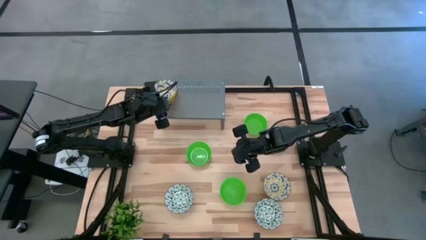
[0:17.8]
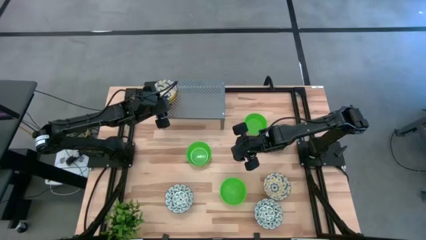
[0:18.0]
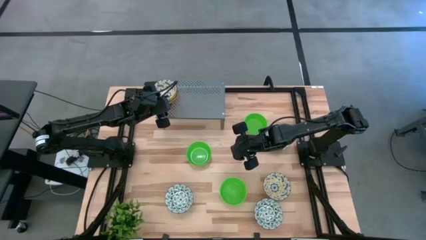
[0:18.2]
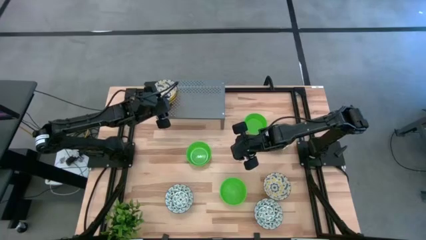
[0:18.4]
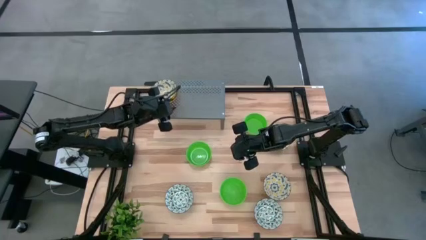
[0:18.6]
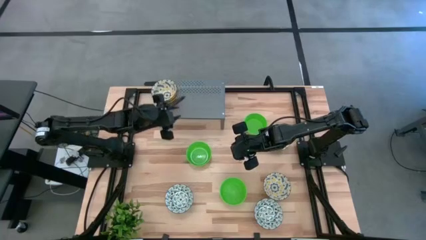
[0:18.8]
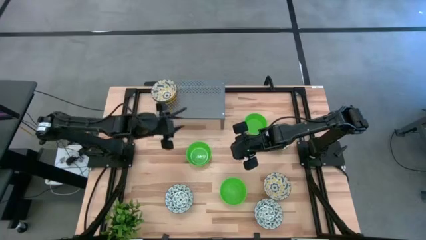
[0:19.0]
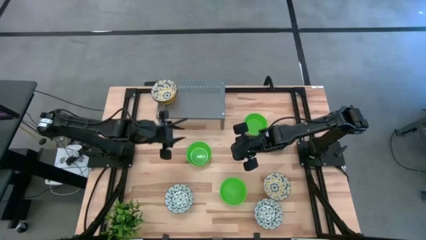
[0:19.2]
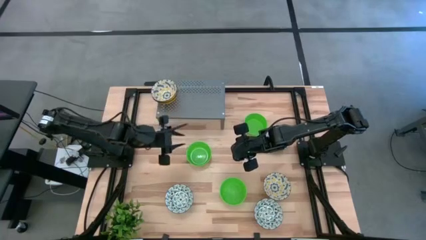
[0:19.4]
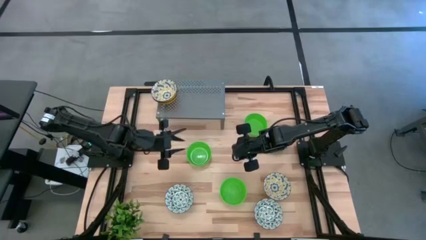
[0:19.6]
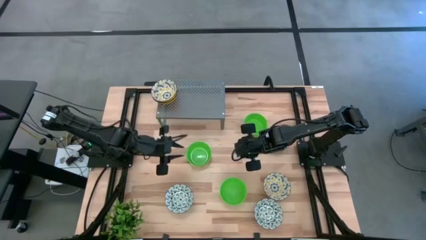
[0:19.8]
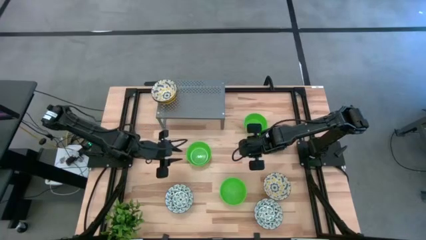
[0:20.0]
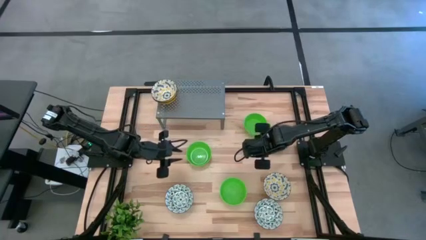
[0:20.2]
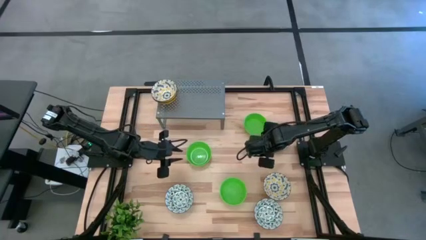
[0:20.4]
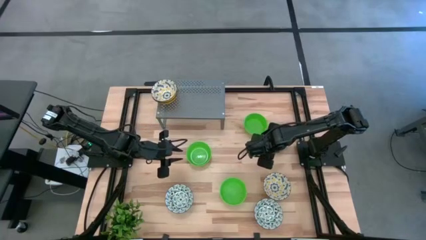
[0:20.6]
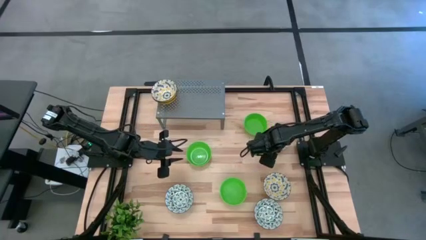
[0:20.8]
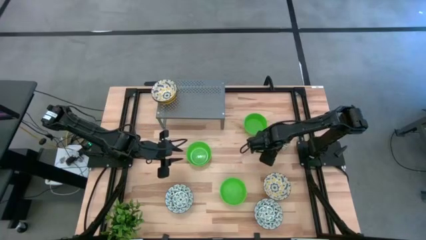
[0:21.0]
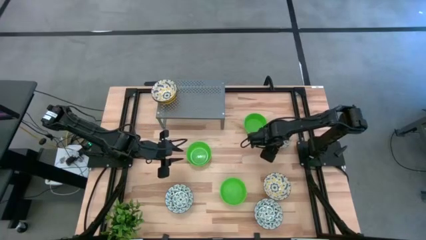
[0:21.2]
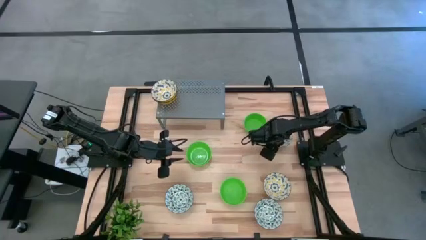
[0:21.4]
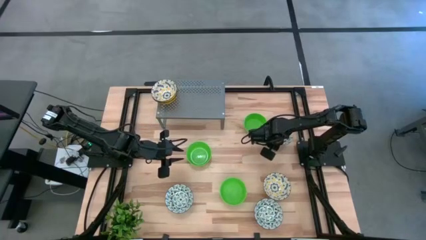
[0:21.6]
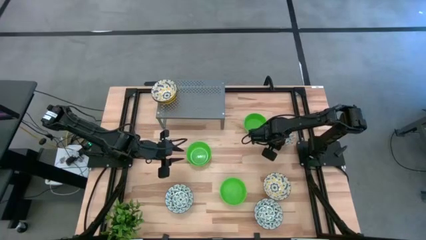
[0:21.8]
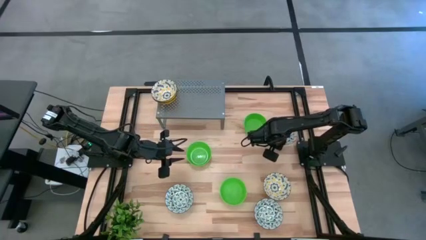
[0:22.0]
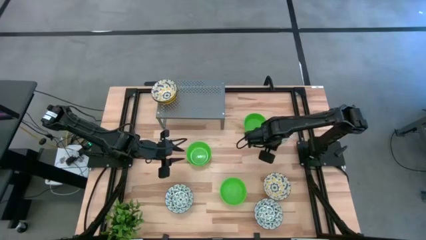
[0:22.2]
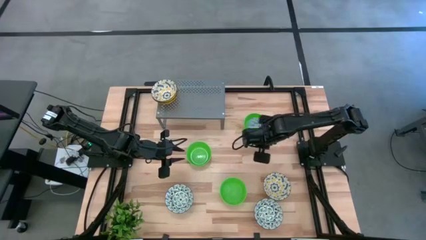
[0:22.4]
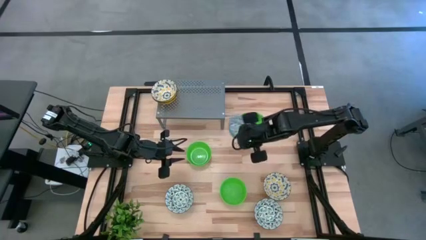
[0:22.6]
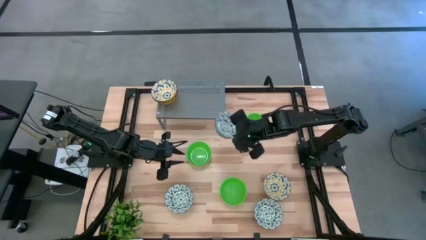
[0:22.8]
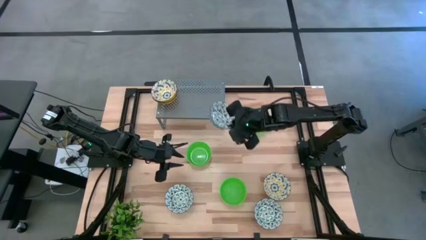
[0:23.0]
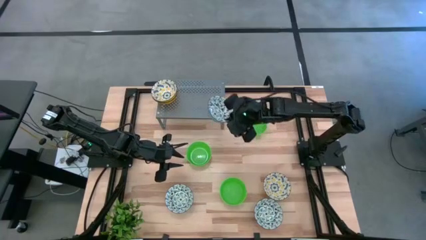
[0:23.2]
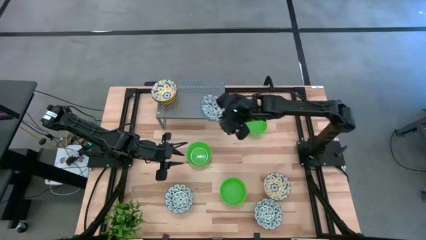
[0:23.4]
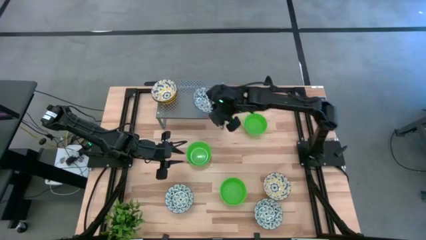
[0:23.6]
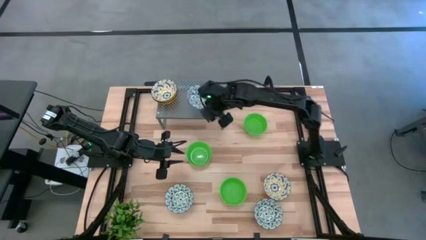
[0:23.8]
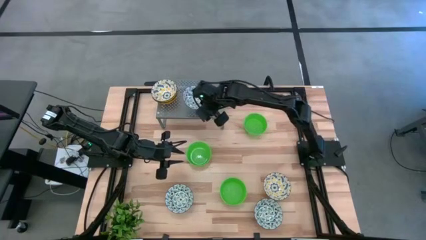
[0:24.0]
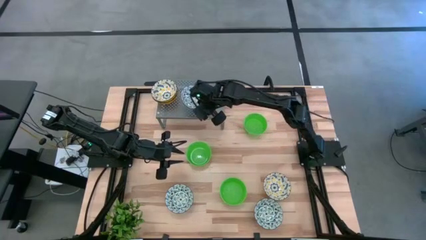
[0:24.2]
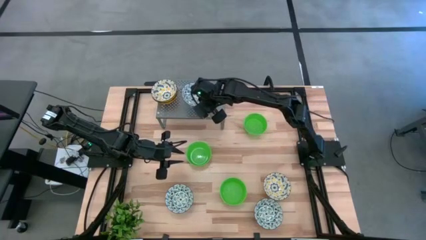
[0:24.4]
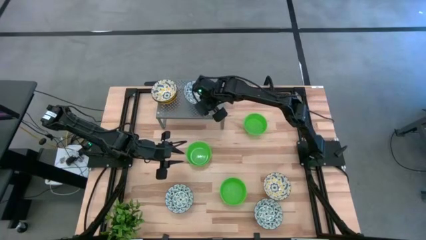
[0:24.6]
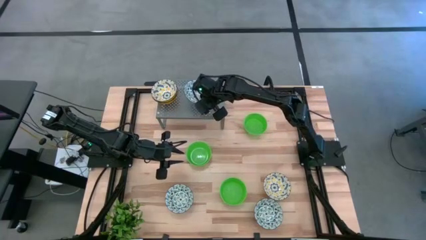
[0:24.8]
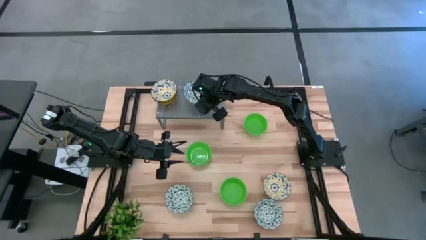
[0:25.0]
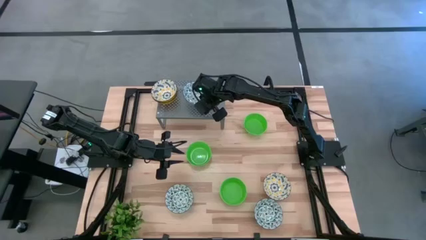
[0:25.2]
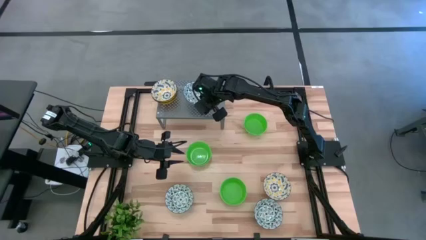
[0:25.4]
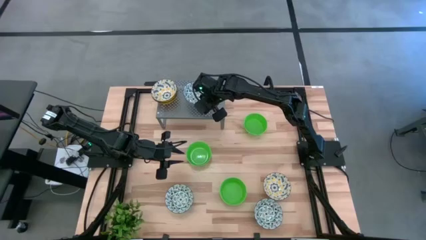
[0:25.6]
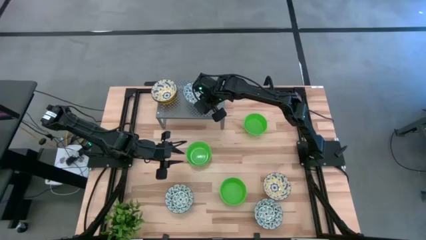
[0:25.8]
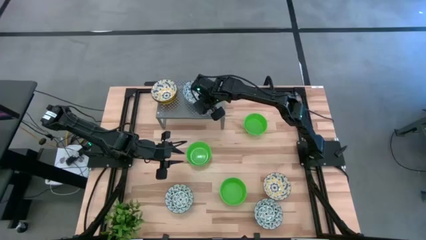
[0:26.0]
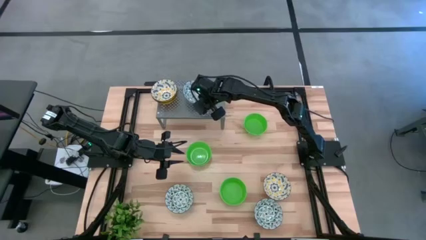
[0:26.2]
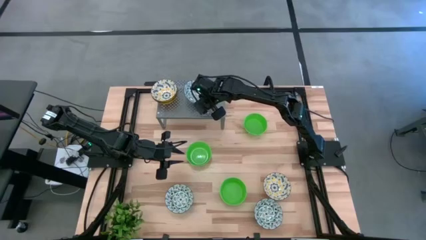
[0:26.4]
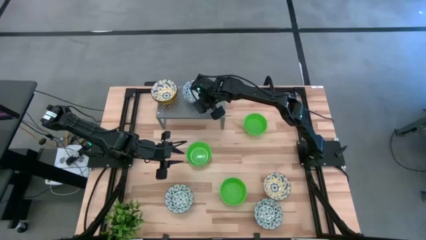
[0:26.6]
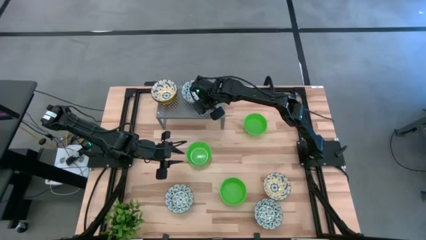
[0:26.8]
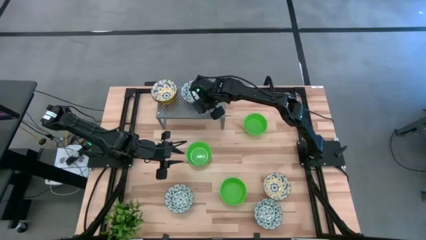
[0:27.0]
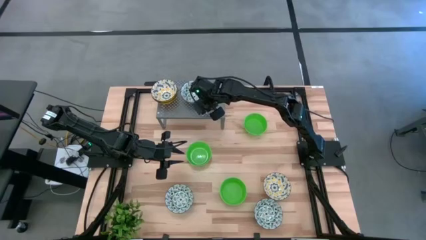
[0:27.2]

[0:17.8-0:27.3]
Task: Pick & Place Mini bowls
Put the top green patterned bowl on the shelf

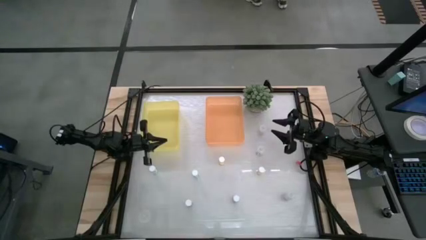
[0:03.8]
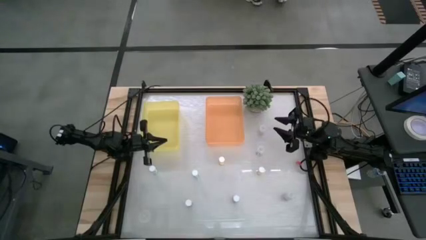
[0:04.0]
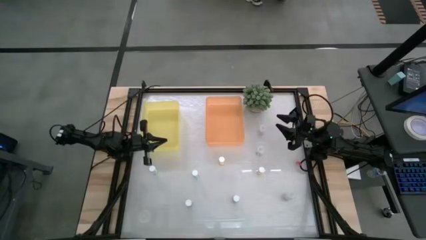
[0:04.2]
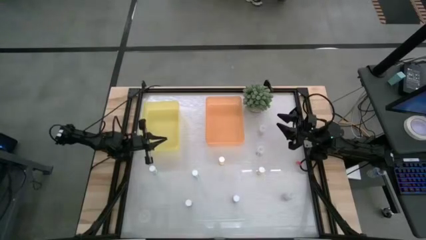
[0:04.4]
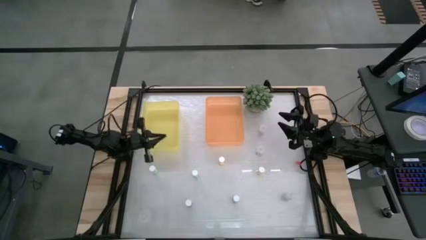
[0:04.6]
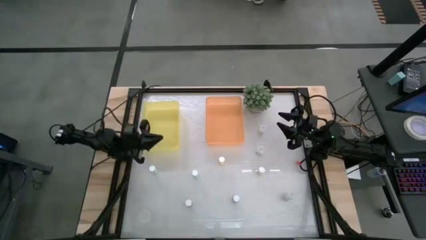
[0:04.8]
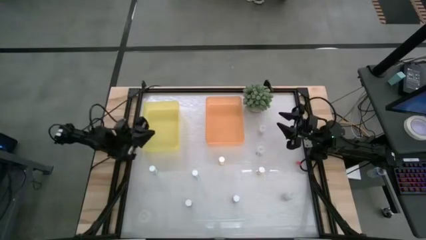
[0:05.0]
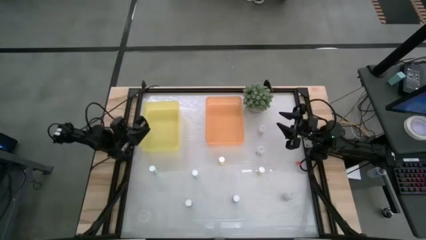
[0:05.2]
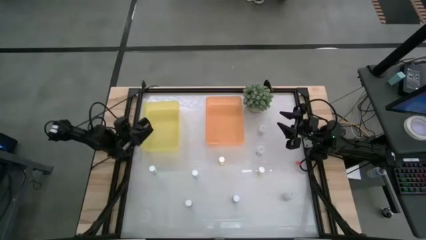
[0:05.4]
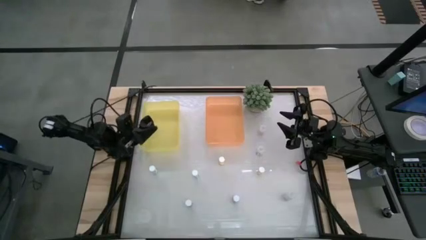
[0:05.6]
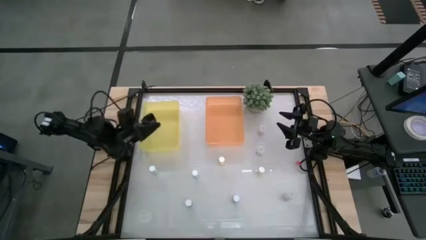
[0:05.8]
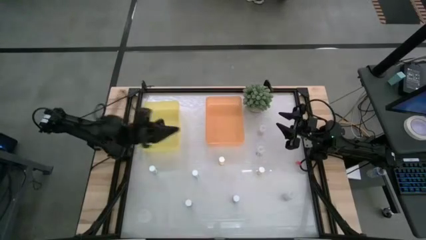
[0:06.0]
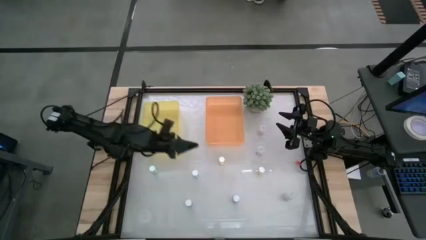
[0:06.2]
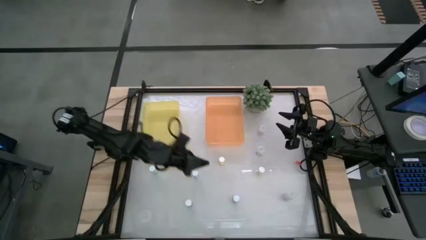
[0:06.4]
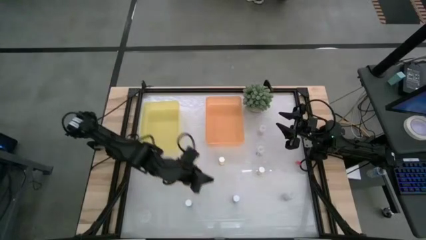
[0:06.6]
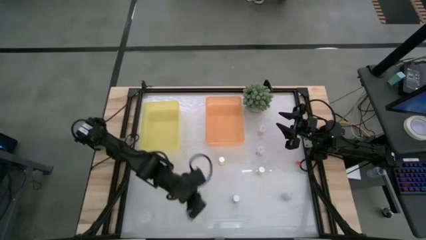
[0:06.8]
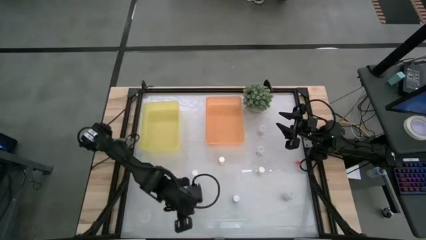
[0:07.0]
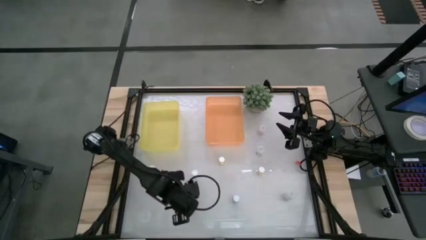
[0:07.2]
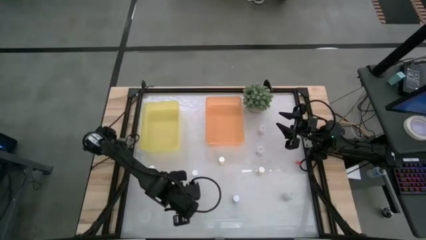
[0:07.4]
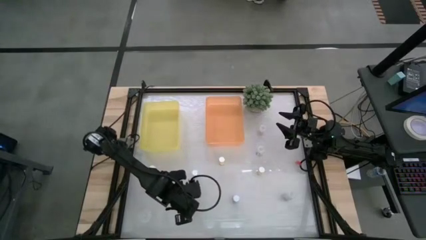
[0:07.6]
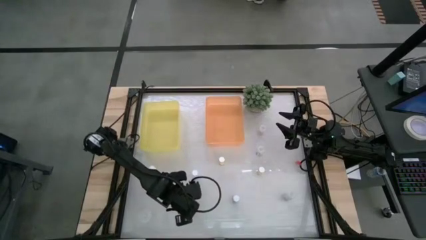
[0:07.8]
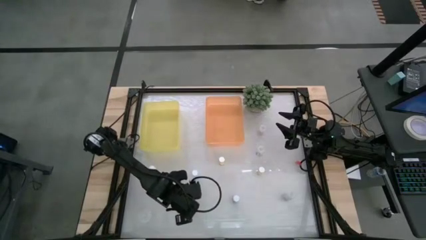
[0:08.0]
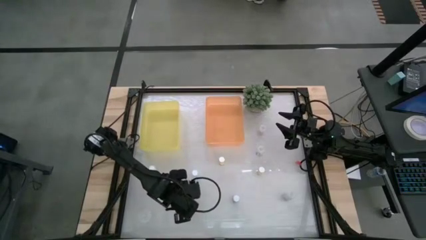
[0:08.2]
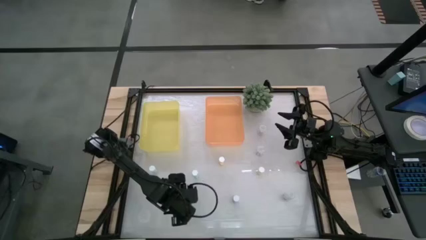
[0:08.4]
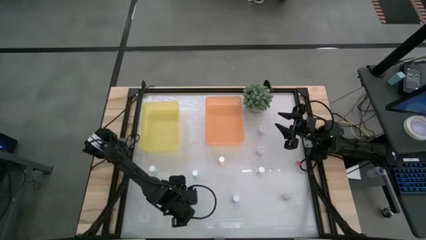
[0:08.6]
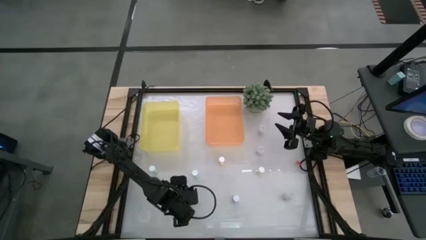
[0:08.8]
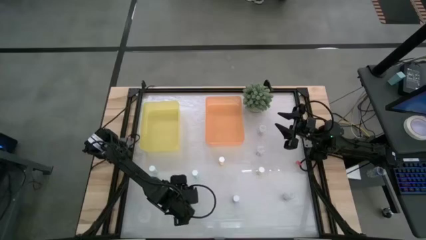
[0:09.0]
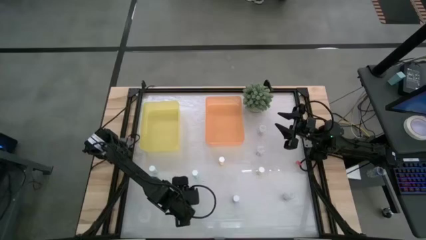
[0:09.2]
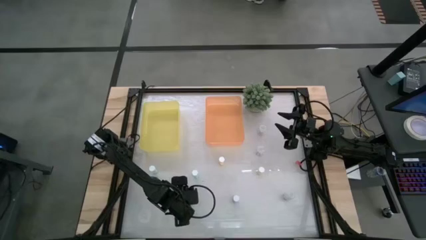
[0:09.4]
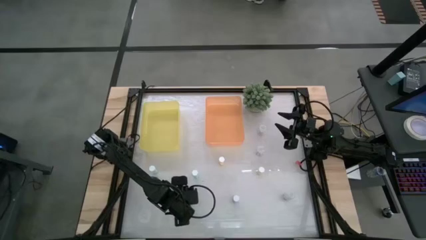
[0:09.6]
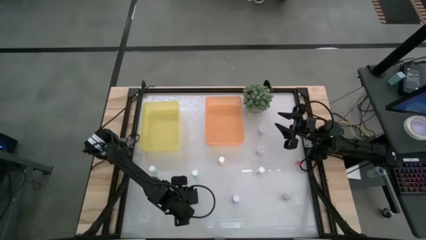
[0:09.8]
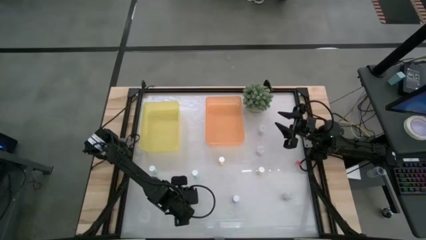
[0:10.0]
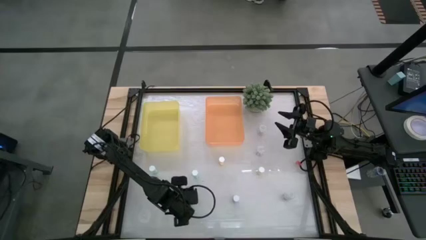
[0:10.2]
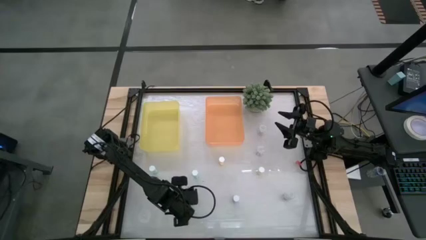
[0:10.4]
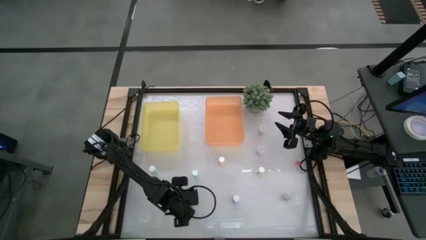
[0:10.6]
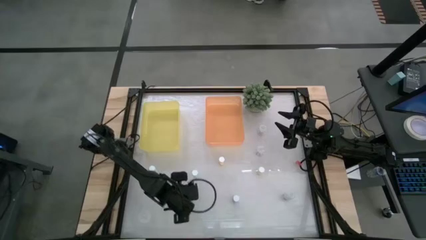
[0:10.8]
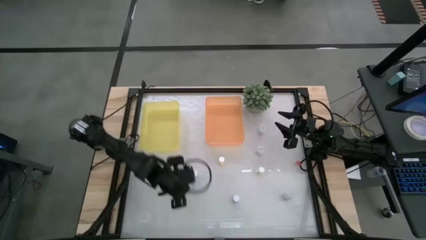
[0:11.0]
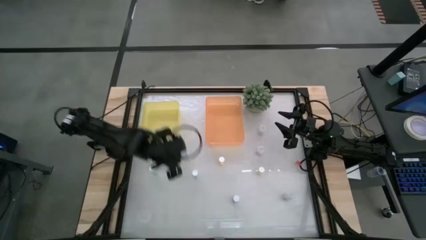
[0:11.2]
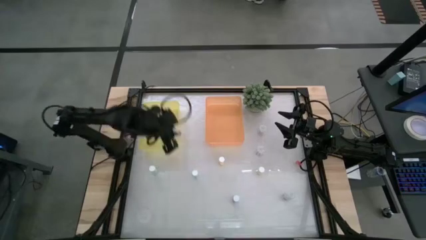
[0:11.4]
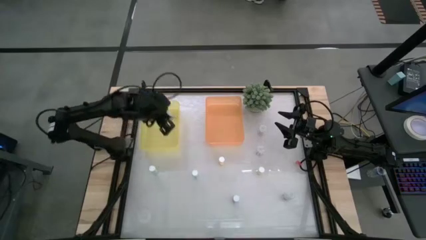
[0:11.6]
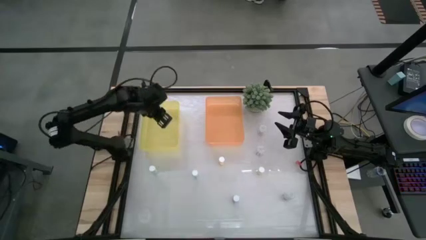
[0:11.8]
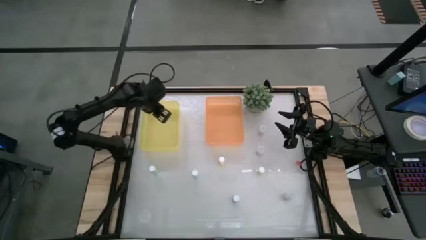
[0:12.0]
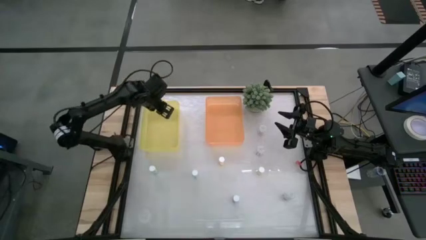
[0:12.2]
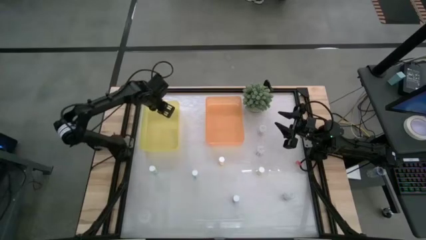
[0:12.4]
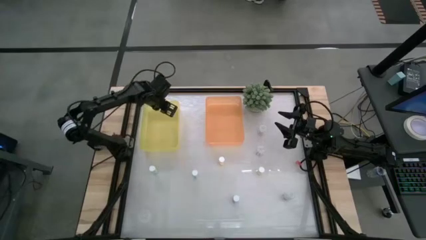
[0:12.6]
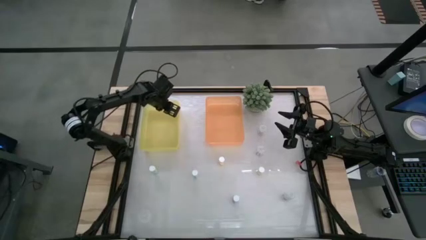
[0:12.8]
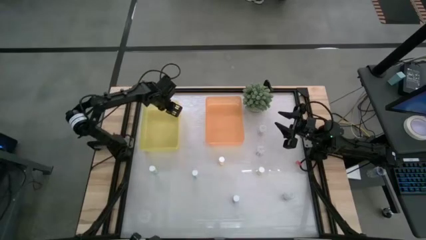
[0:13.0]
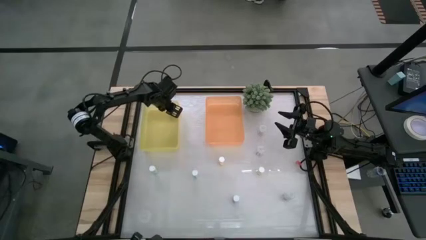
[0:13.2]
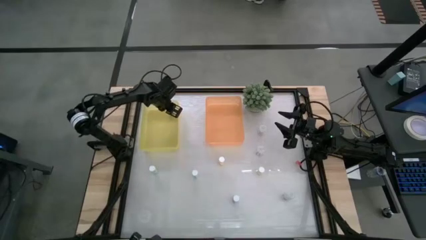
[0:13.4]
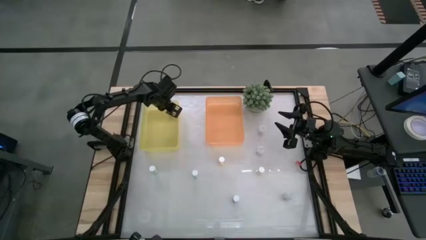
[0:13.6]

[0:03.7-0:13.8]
Task: Pick and place medicine bottles into bin by pill shape (circle, oval)
Put the left blue capsule bottle into the yellow bin
